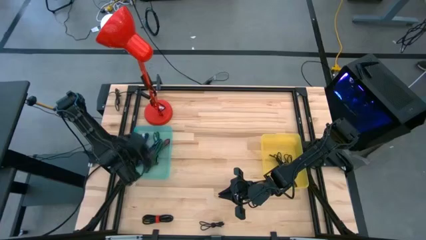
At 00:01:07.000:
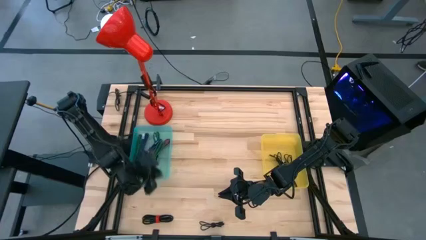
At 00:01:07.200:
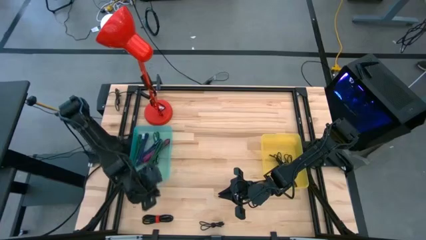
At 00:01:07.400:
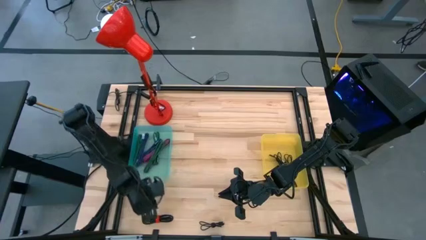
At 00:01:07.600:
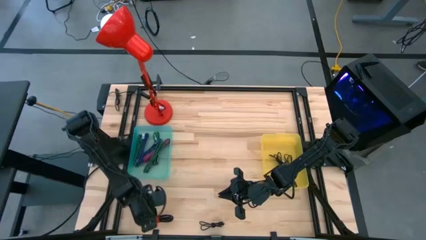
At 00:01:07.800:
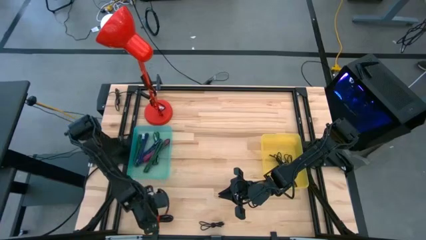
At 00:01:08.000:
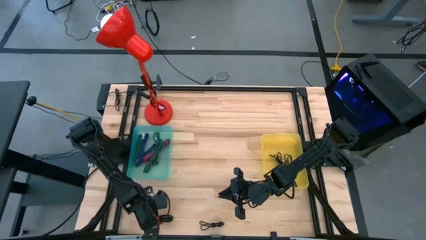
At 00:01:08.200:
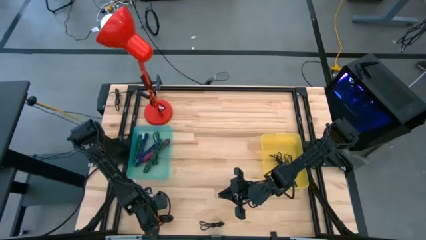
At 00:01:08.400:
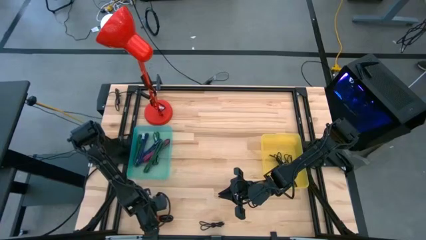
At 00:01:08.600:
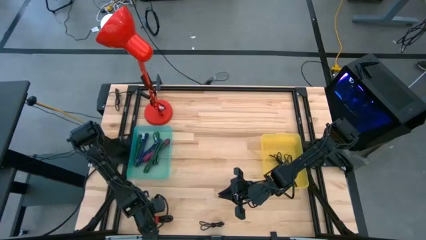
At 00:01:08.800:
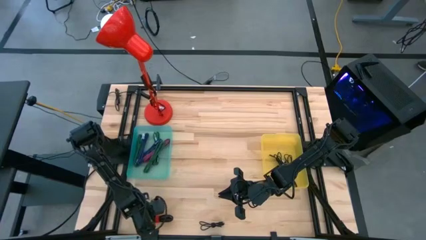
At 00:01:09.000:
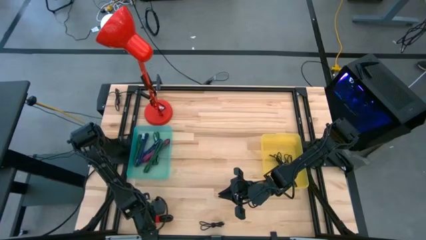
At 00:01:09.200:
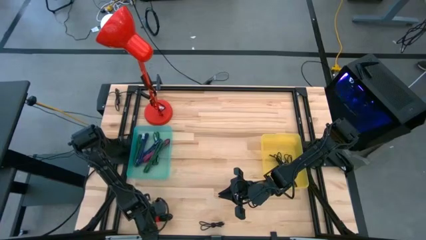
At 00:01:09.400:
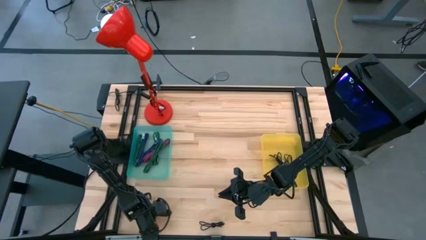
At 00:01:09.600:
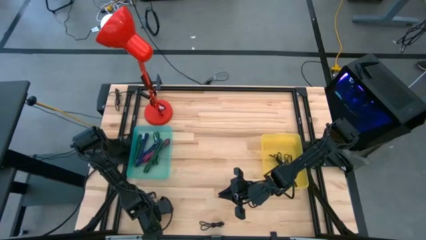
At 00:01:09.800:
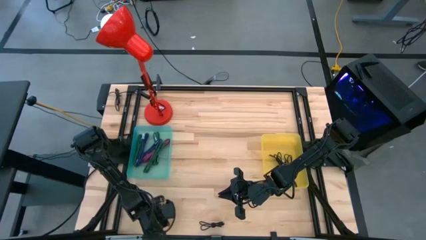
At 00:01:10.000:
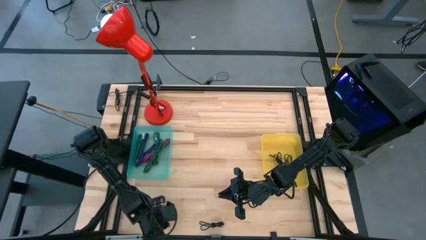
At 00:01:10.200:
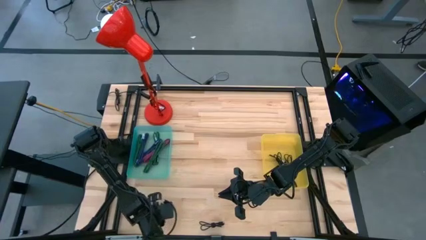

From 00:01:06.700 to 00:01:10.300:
Task: Pick & Place USB Port
Put the black charger cable into the yellow bin

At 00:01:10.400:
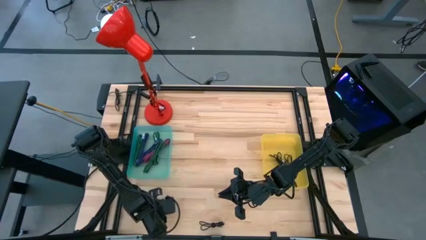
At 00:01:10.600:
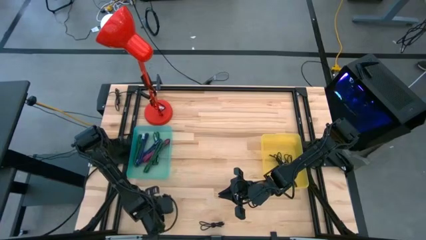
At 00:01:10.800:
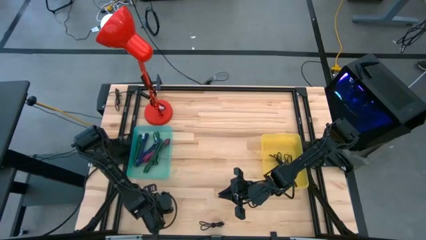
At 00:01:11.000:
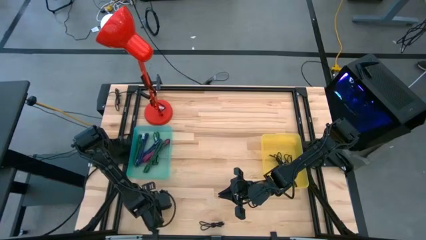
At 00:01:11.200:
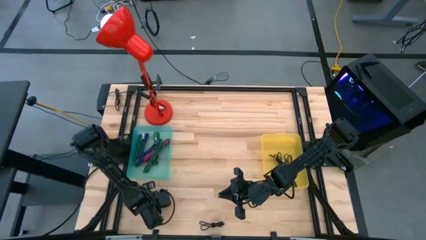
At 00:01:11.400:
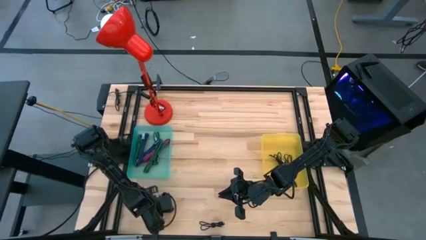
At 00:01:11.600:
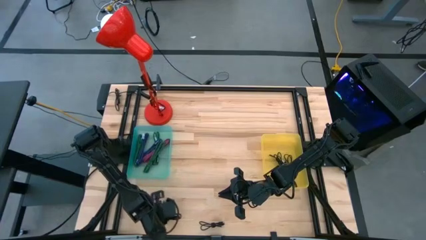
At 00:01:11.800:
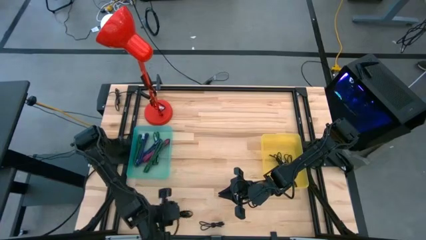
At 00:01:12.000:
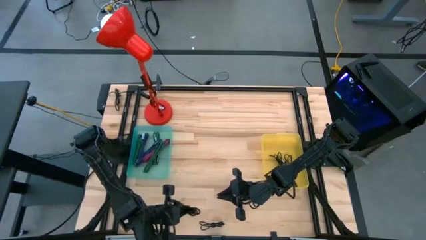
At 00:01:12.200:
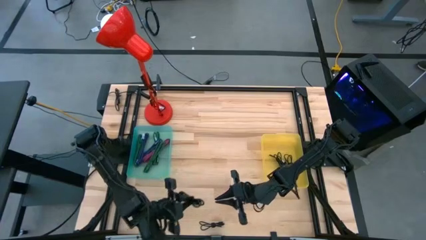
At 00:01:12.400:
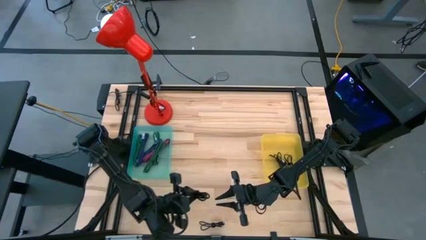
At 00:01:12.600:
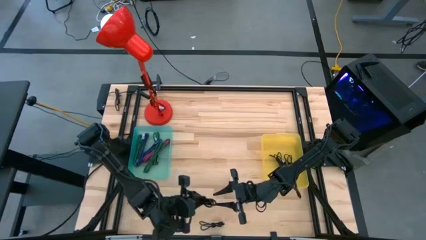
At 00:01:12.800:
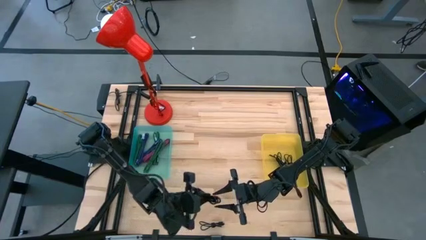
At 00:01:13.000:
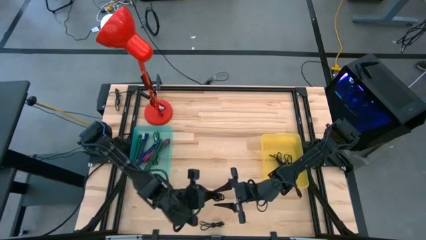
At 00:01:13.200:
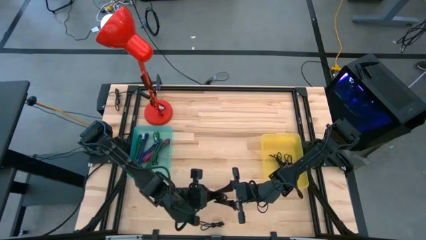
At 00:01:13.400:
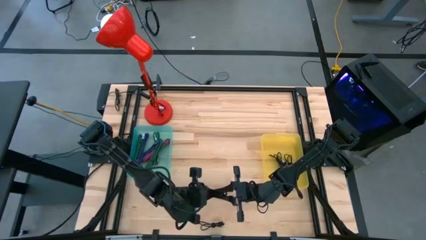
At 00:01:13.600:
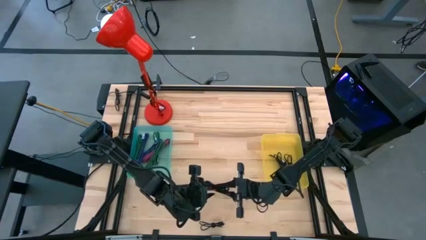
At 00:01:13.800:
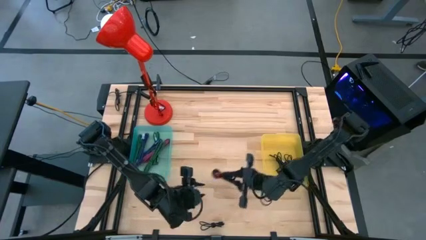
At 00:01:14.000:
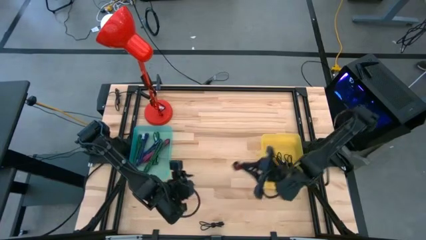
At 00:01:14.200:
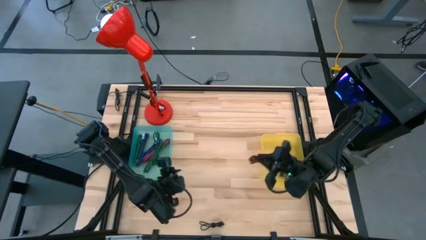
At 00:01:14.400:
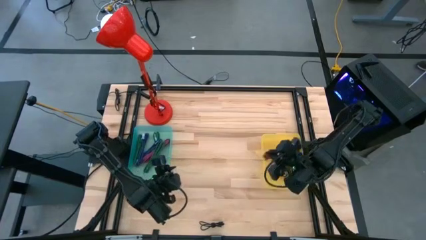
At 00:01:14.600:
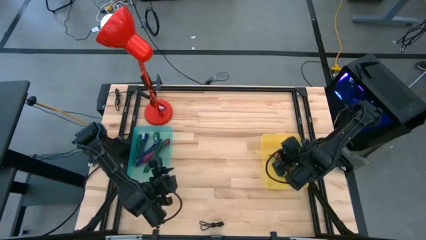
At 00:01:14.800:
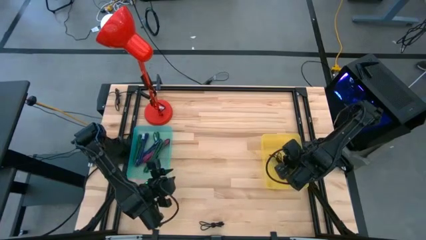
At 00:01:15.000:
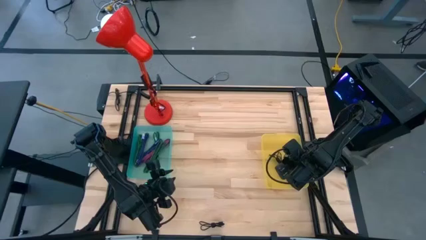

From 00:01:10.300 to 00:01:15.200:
Put the black charger cable into the yellow bin

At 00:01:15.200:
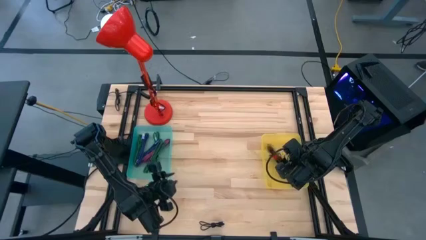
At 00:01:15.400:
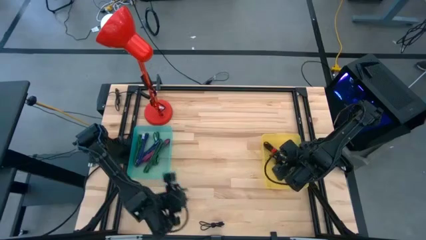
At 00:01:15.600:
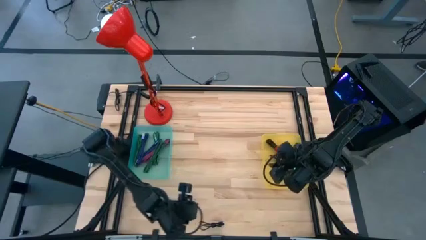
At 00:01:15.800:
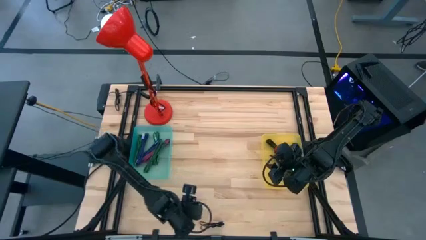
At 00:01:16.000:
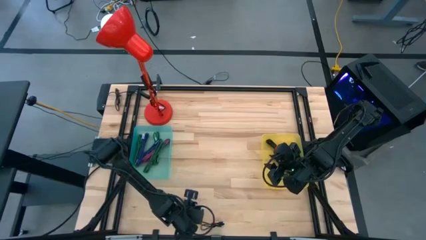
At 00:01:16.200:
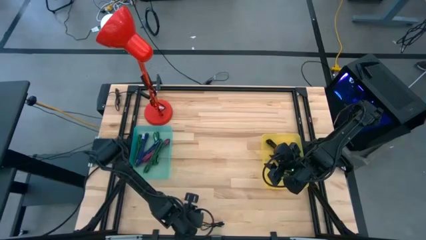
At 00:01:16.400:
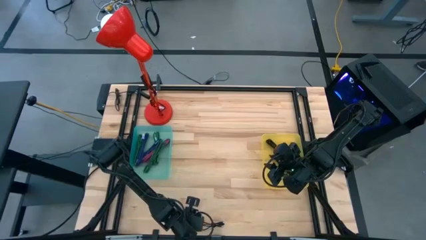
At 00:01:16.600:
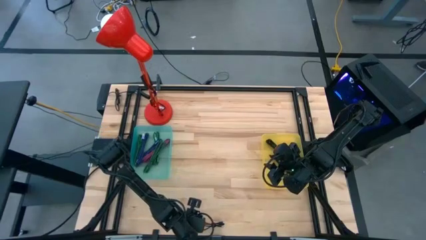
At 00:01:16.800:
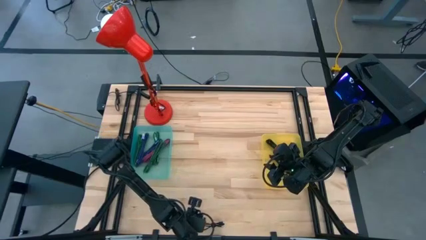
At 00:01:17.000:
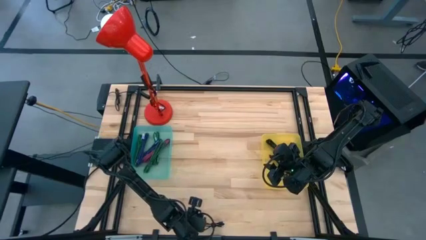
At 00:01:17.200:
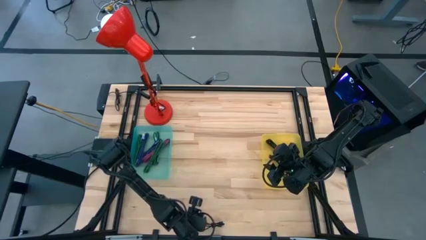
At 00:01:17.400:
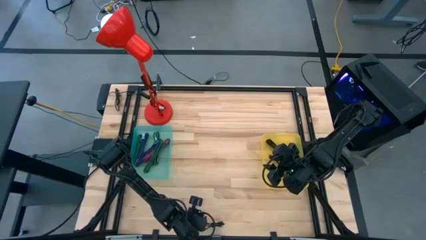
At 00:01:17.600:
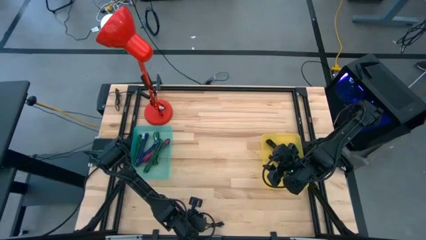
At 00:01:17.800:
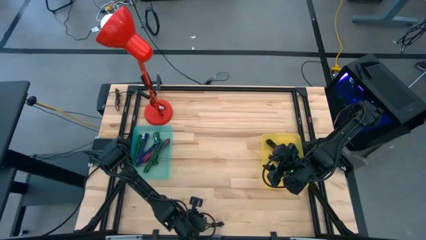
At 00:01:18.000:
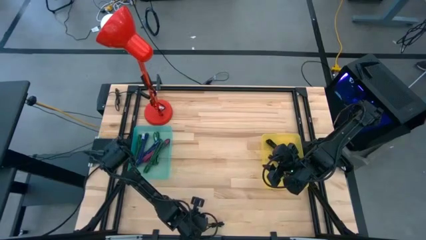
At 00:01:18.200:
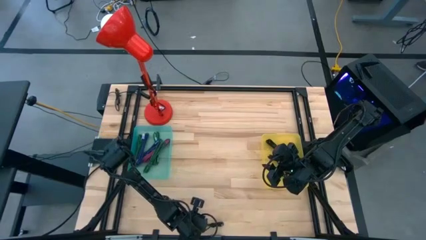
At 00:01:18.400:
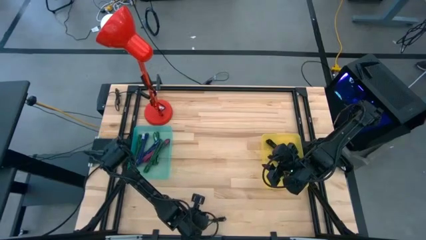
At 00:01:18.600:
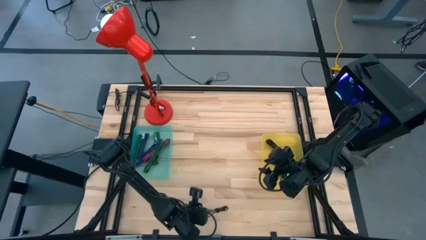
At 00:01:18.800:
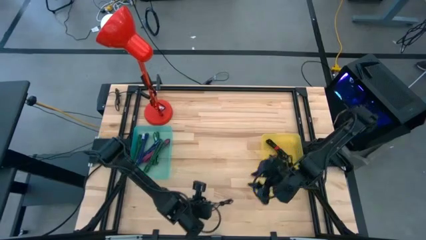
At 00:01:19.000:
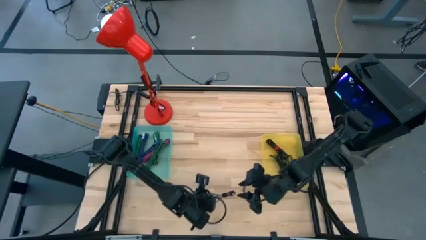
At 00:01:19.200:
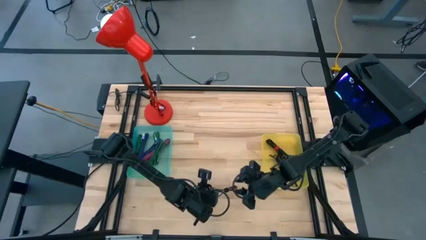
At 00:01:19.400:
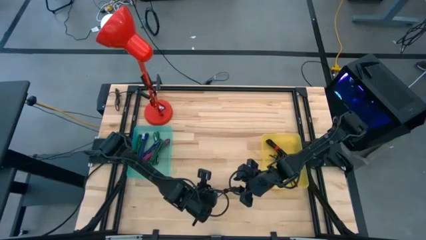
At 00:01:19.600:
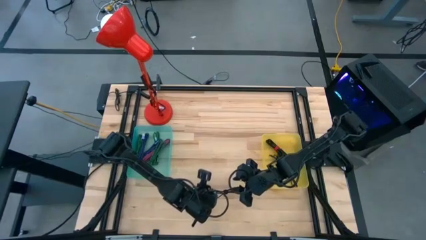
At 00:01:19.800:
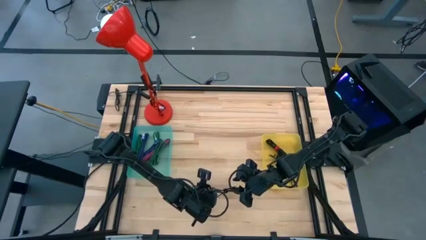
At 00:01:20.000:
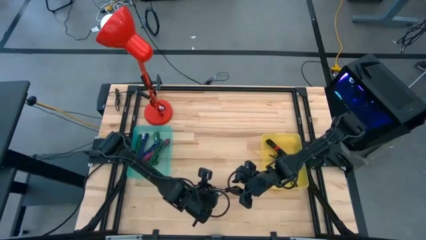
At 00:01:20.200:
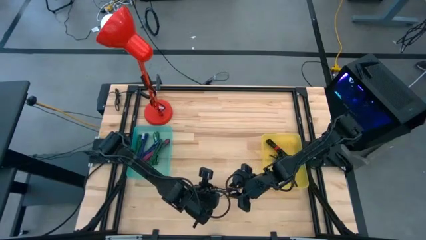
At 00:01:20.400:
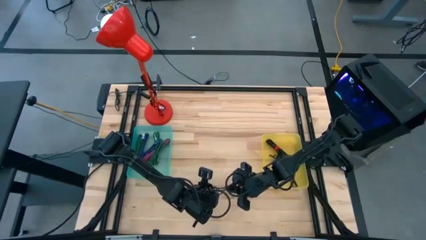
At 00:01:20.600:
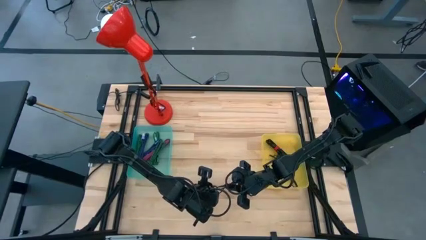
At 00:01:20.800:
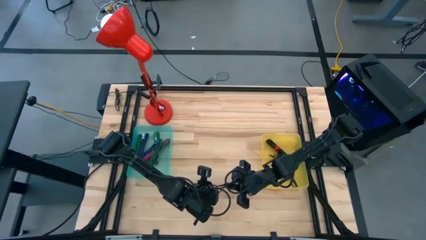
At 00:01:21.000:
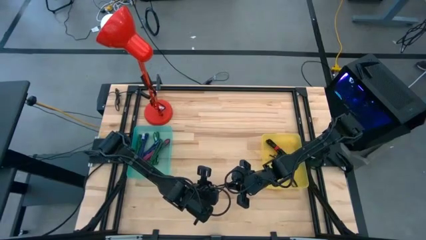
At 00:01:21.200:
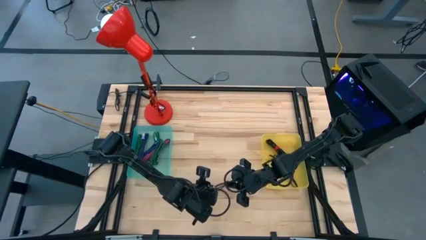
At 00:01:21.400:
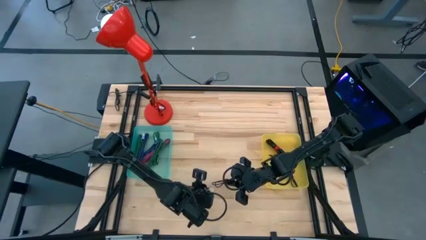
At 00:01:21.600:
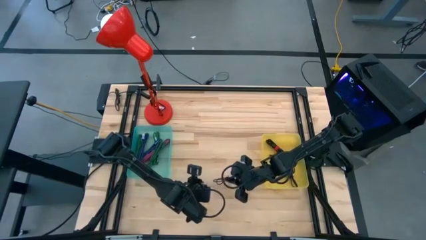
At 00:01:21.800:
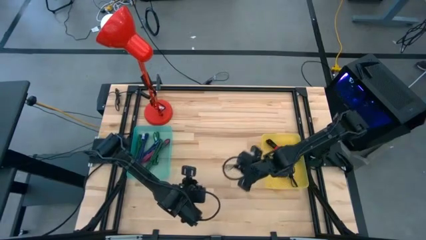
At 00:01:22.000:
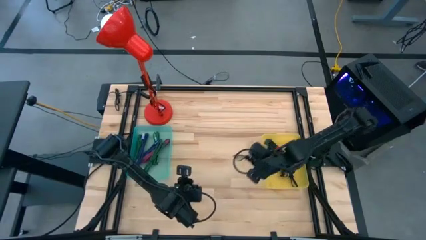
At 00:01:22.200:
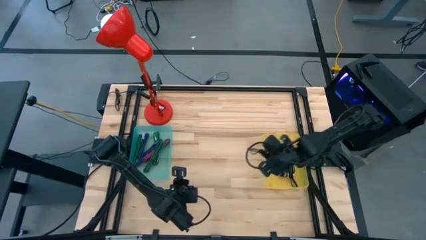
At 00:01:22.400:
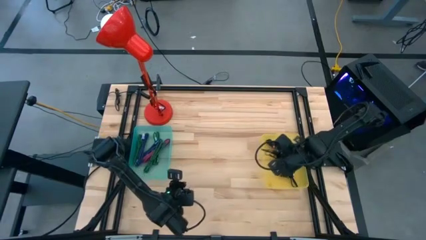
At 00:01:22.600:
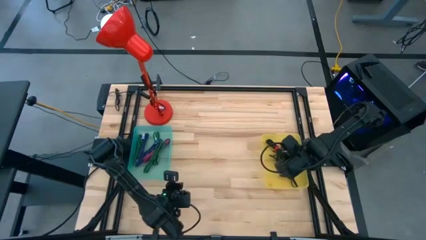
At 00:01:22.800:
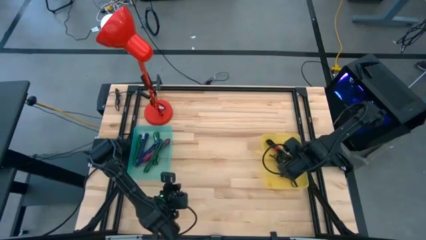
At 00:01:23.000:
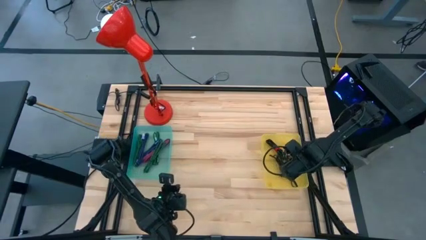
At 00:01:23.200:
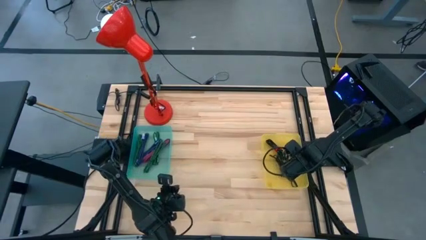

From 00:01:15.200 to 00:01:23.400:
Put the black charger cable into the yellow bin
